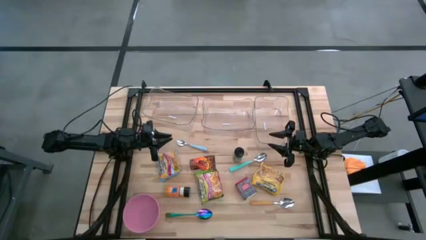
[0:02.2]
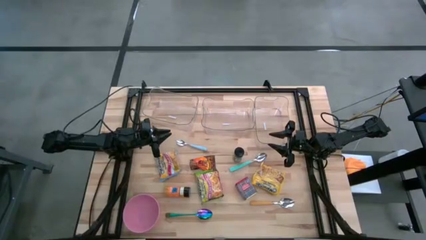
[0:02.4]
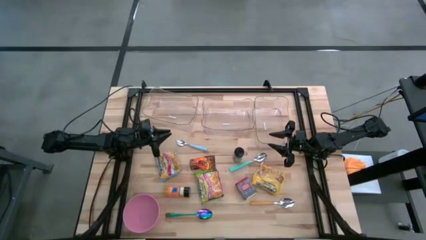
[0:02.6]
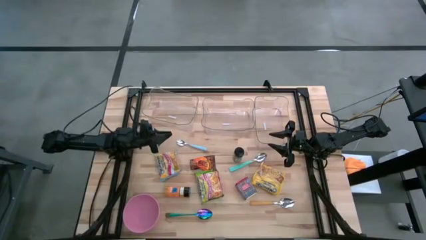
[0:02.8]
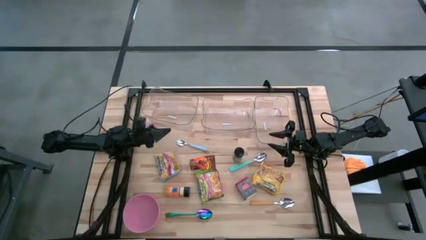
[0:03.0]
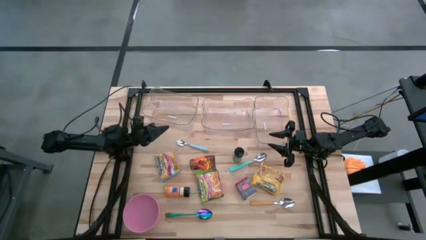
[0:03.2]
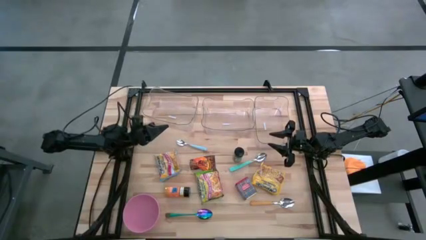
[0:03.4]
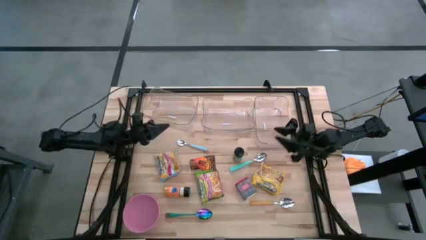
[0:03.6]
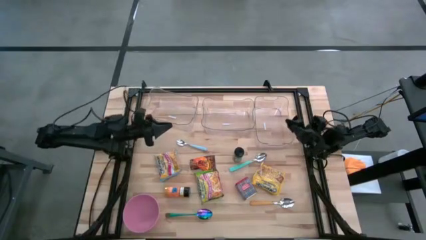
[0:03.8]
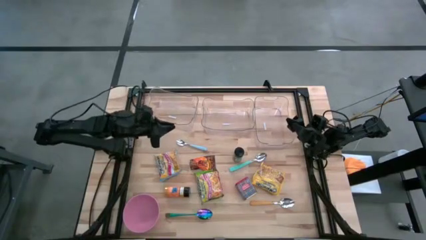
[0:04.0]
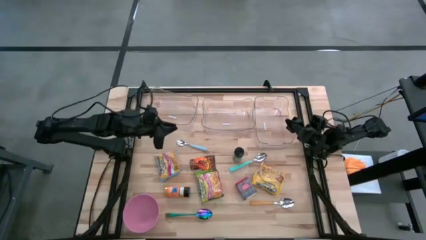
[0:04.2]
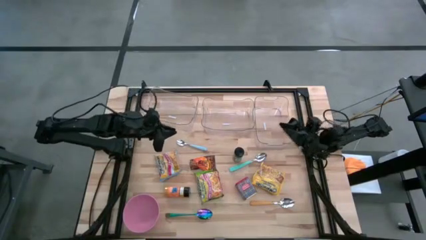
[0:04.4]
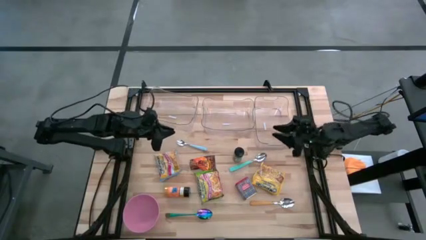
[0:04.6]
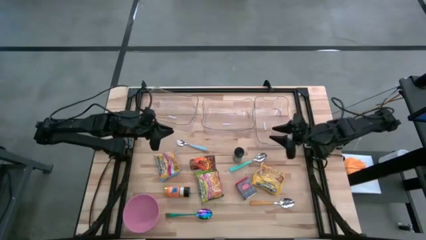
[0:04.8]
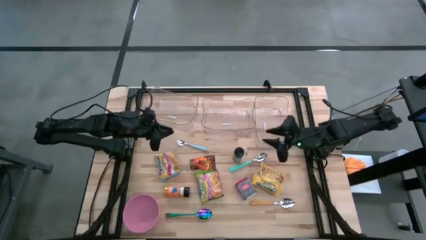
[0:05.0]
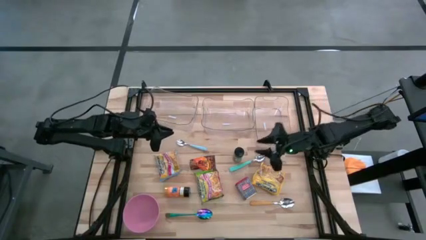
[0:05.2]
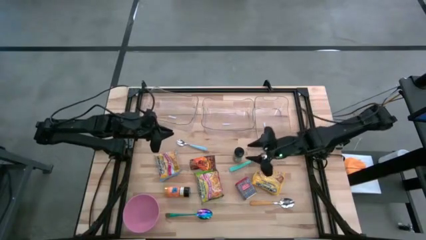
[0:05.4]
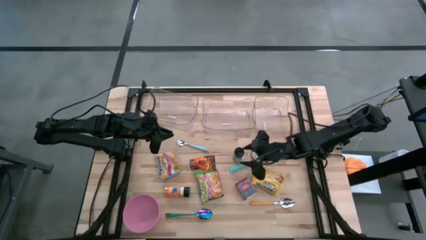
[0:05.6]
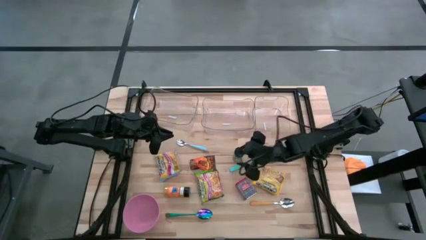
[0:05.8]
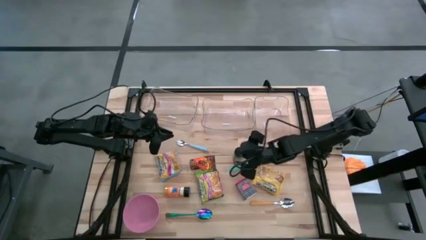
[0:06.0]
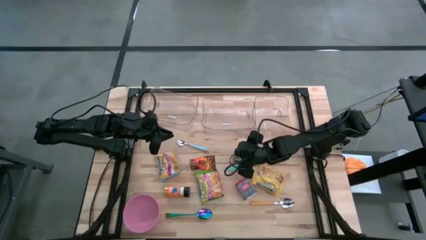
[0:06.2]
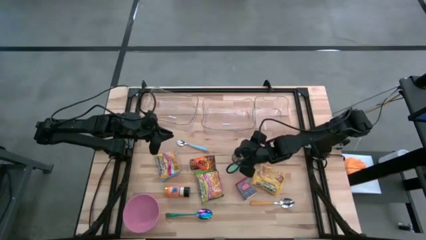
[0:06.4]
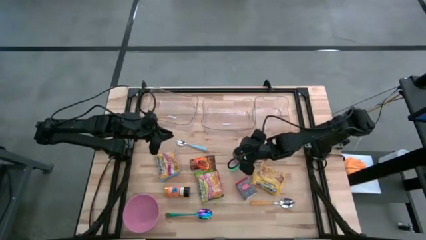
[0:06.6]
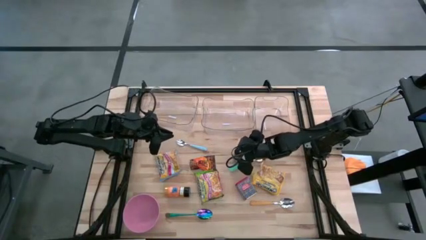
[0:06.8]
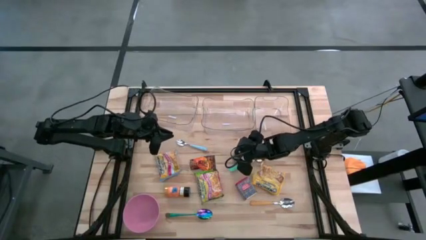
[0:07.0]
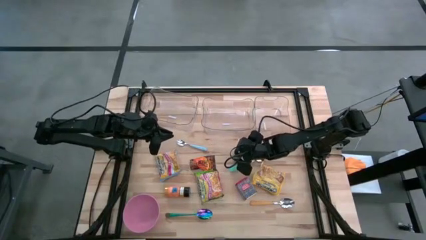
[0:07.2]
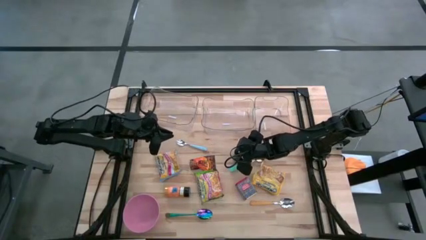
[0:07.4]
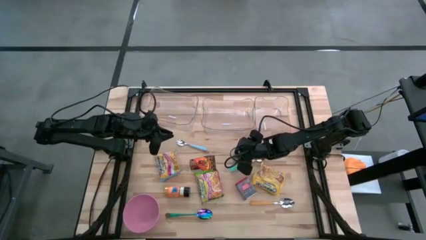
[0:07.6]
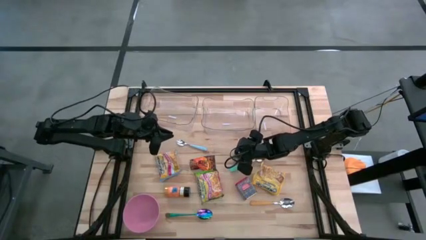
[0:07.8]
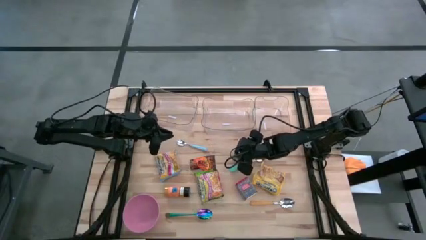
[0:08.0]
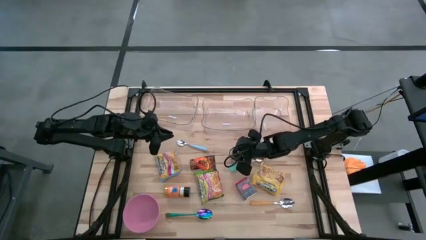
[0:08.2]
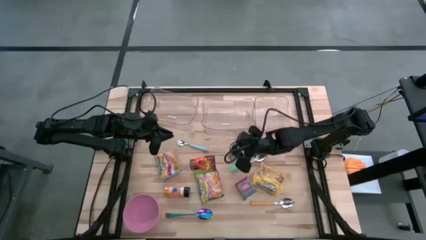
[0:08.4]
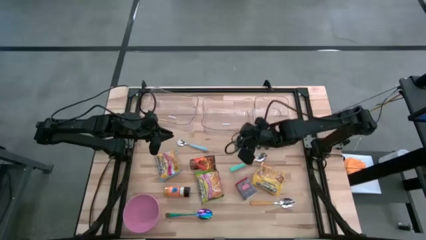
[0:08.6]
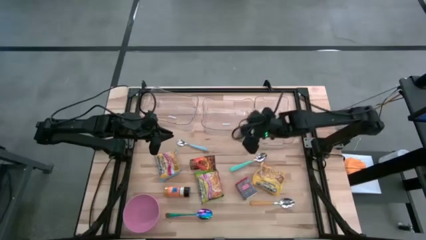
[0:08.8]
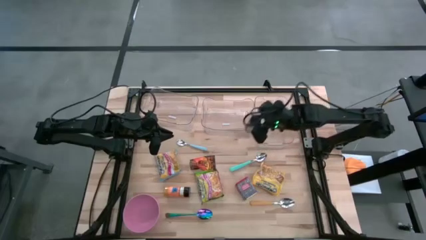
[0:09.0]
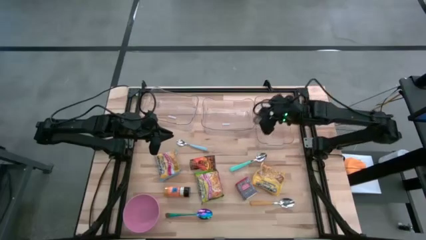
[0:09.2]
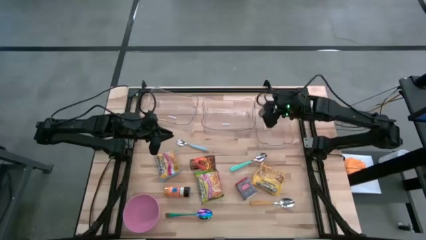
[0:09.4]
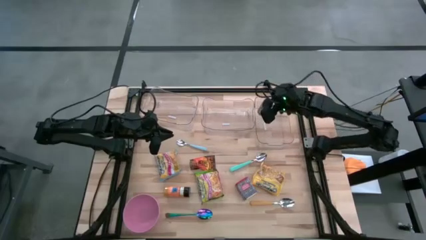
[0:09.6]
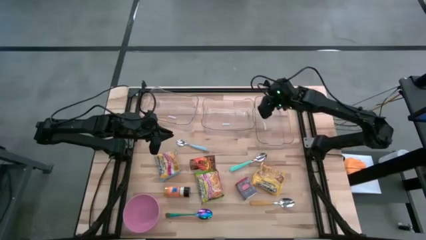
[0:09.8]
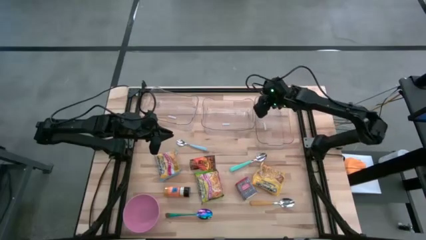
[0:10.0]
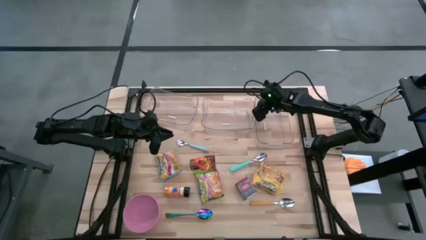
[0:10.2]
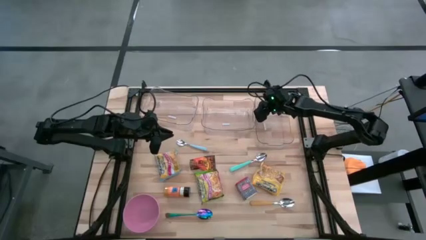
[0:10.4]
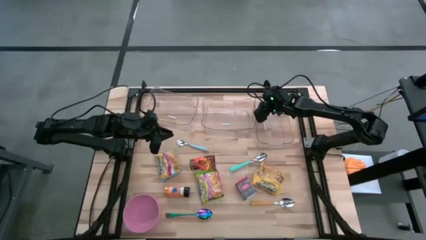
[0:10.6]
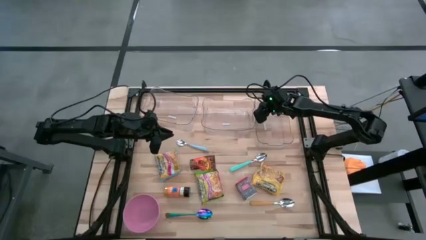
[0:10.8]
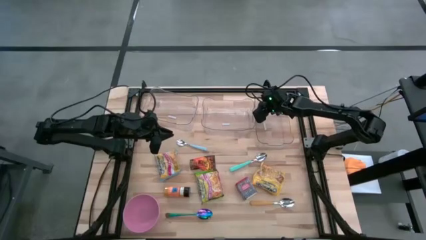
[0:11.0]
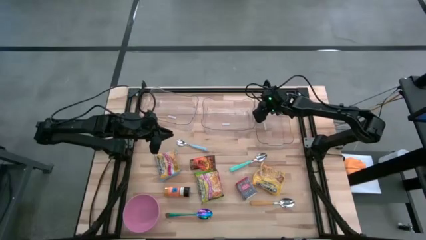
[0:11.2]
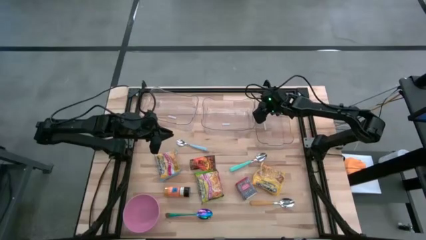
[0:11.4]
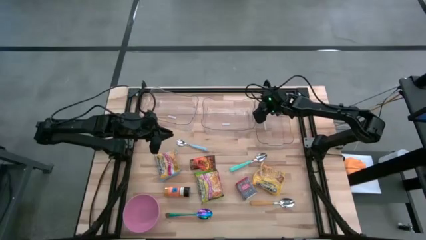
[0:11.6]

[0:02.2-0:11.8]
Put the black seasoning bottle into the right transparent bin

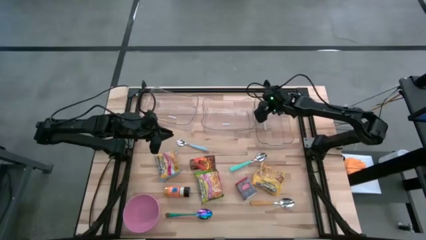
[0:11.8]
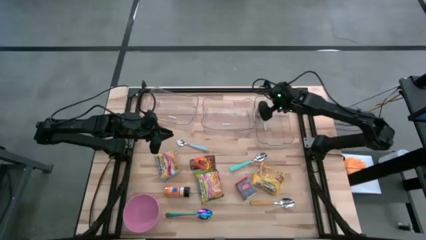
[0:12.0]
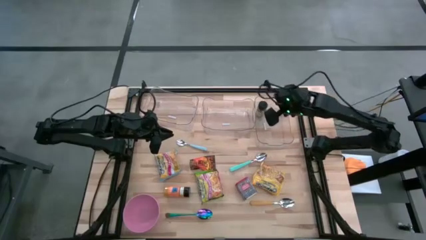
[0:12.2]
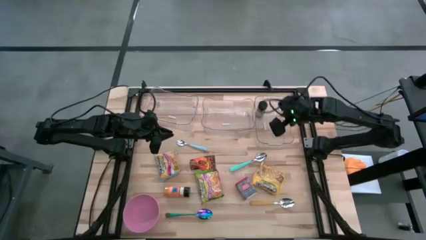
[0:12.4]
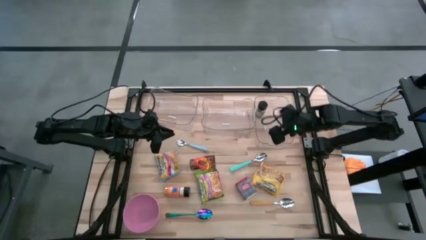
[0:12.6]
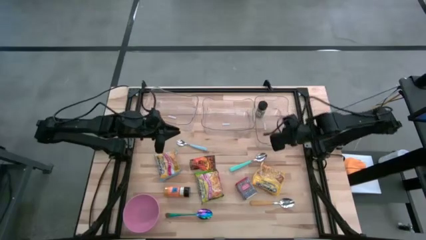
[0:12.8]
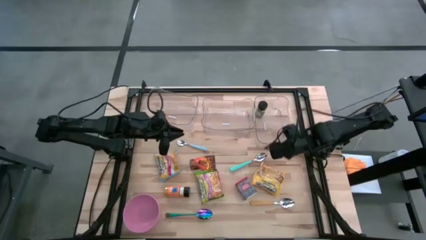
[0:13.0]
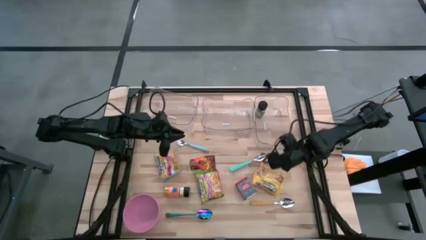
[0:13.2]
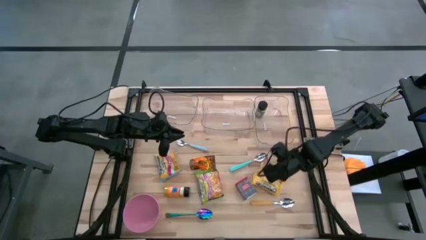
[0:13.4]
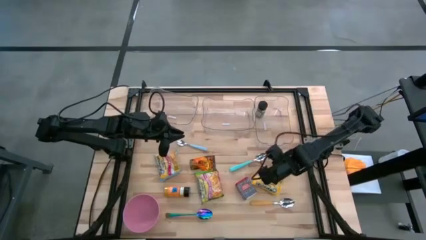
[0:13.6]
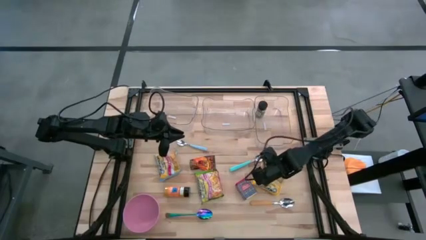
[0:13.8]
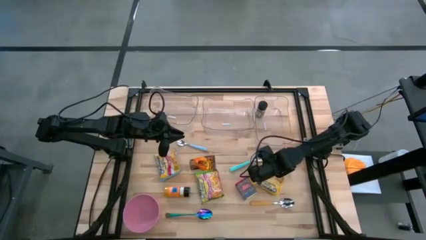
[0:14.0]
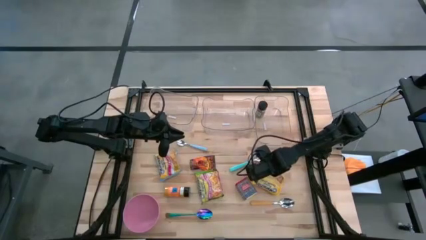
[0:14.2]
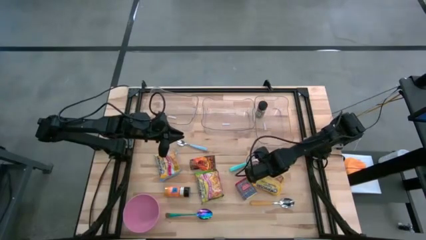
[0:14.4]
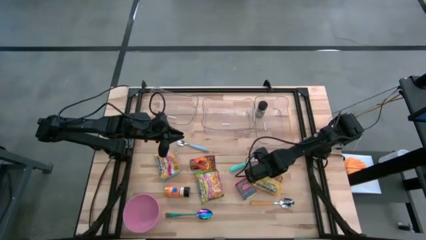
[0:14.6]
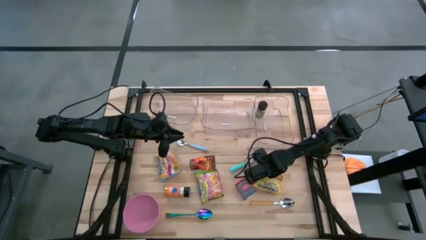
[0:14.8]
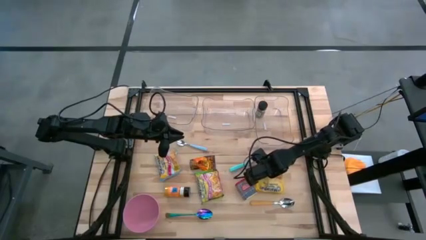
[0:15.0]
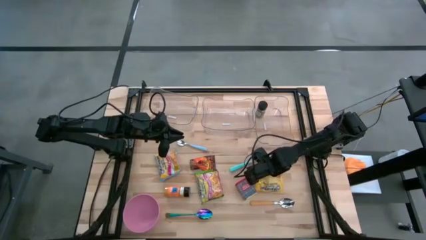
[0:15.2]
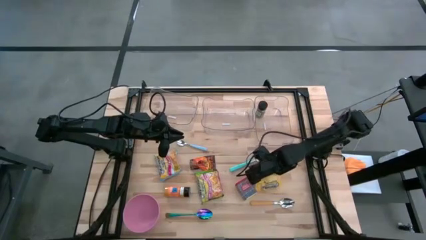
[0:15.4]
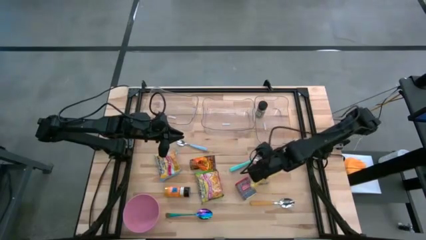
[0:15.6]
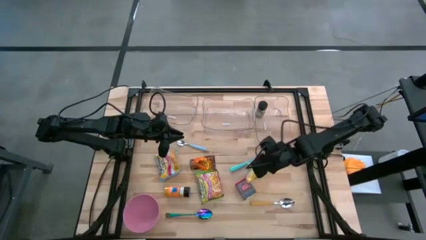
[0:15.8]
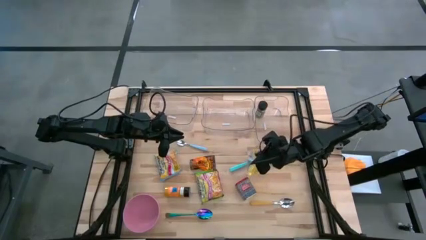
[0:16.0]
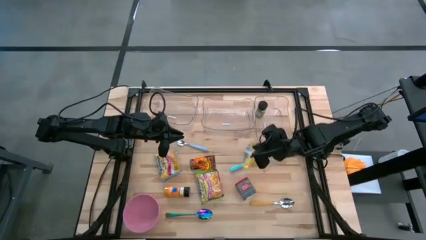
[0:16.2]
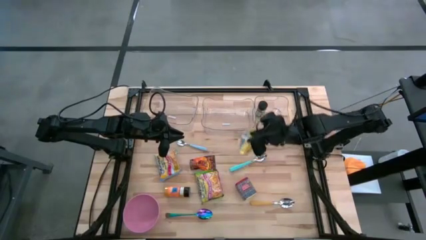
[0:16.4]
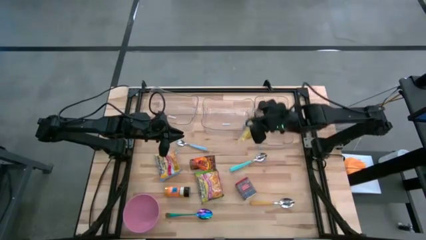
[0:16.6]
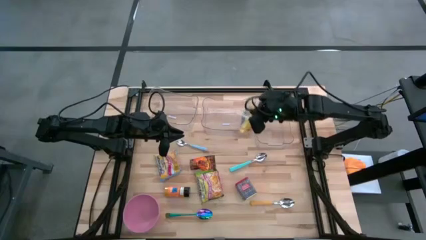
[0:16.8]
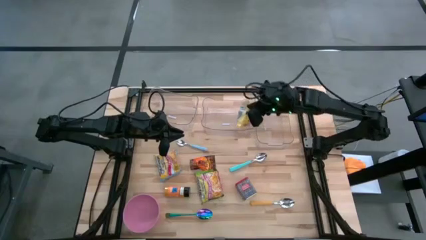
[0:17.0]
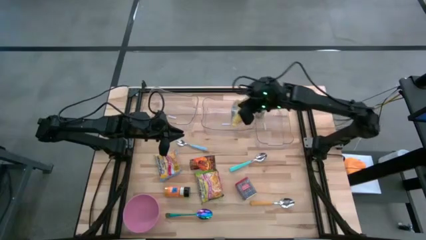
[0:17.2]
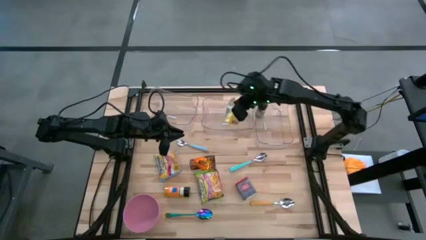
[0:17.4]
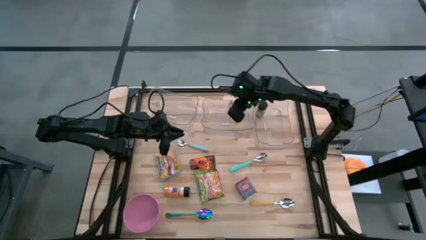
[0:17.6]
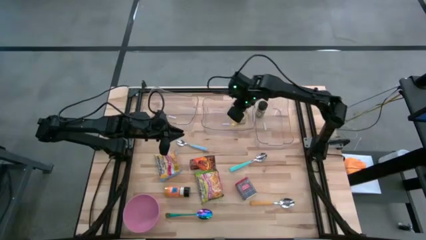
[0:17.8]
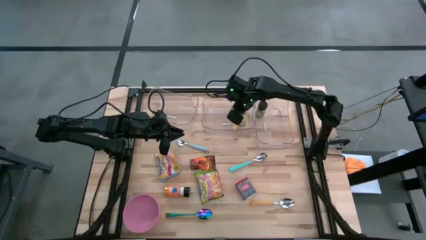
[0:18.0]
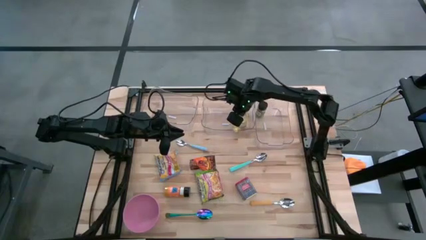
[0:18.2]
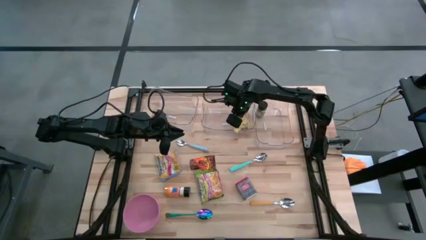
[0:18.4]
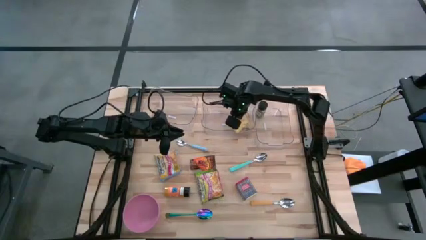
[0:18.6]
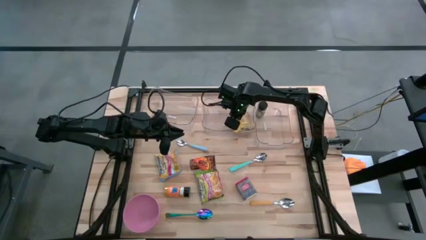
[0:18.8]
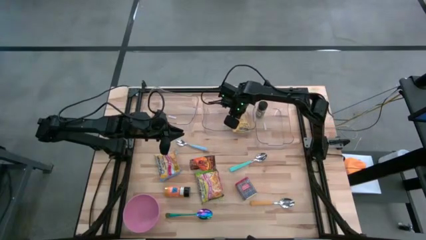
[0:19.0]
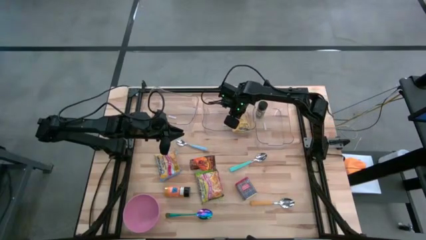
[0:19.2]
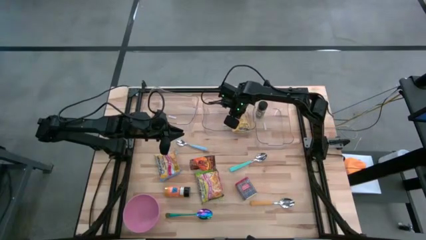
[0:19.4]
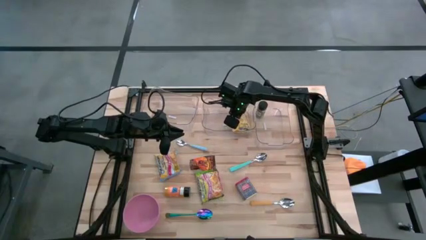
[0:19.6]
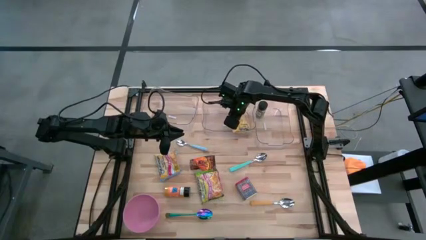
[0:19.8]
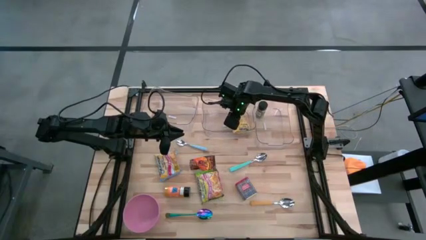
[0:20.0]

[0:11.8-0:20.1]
Put the yellow noodle pack into the middle transparent bin
